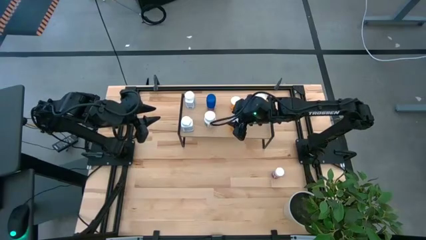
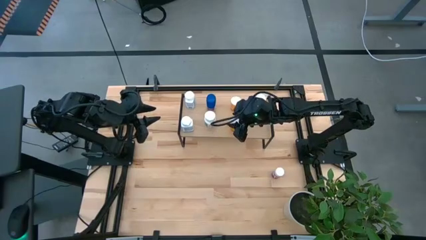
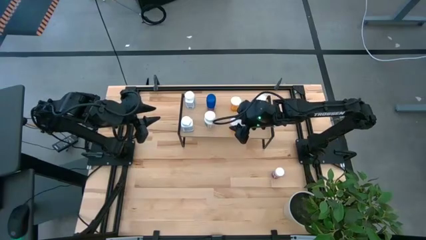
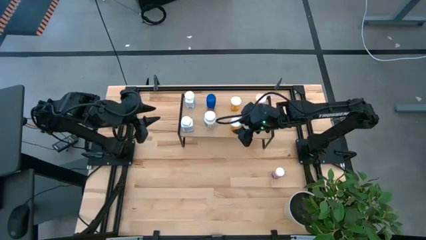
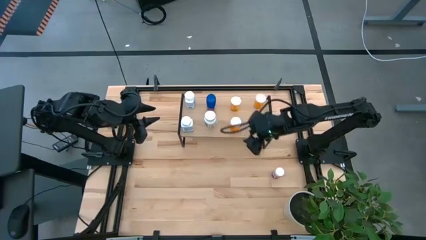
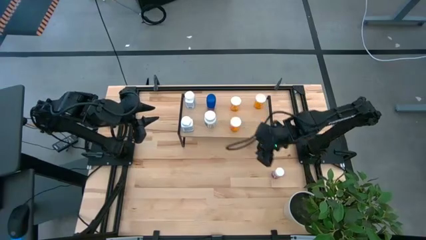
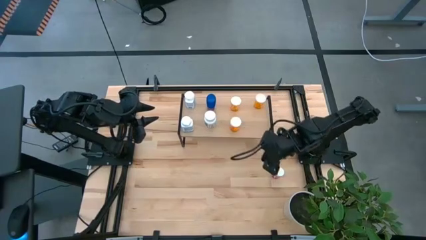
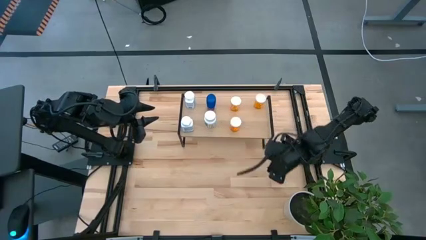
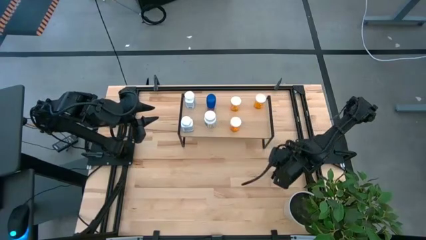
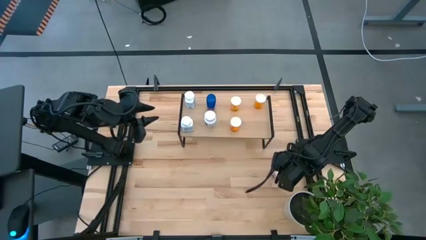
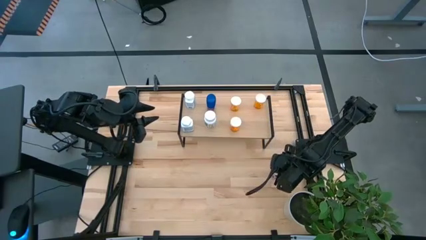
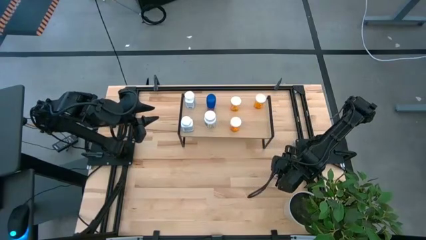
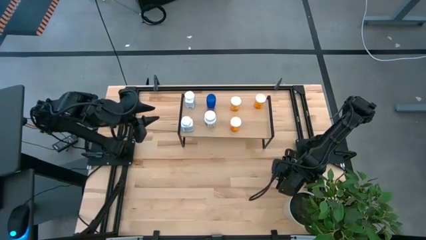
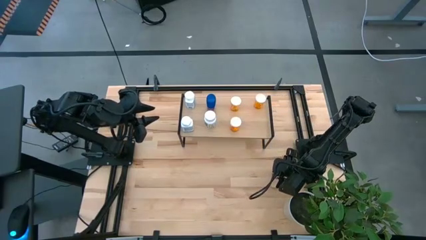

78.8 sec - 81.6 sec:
Task: Pick and place medicine bottles onto shelf by color
Put the pink pill bottle on the shelf

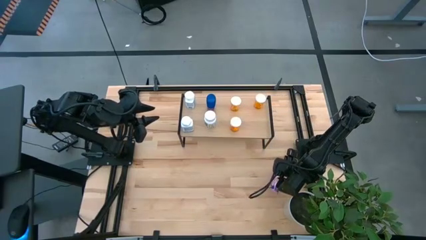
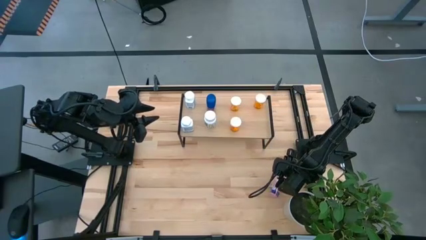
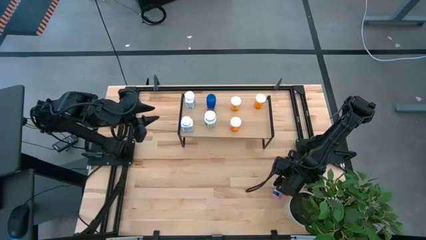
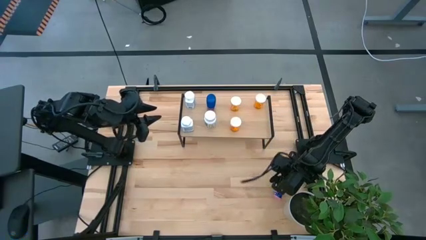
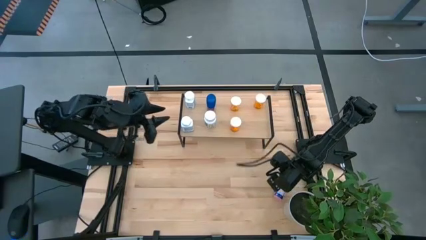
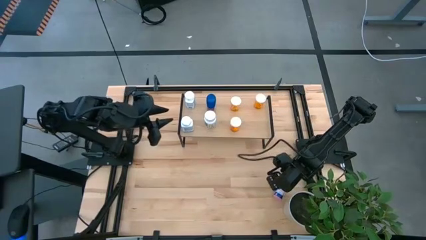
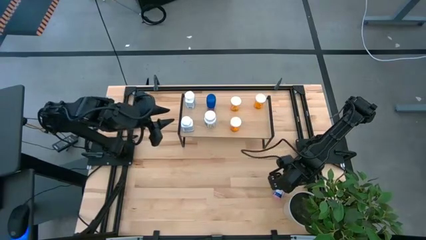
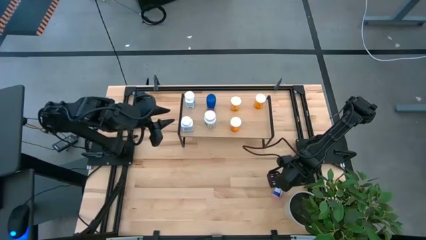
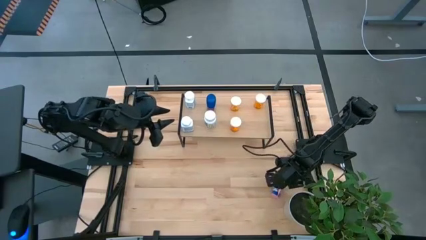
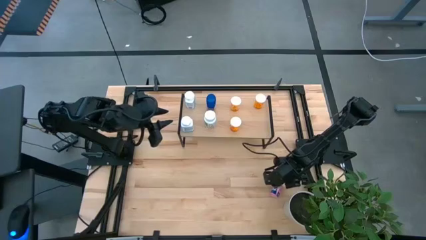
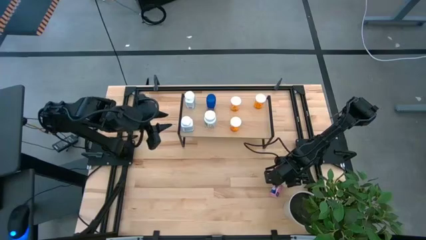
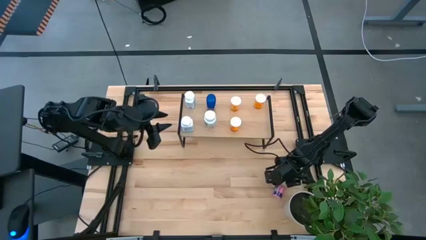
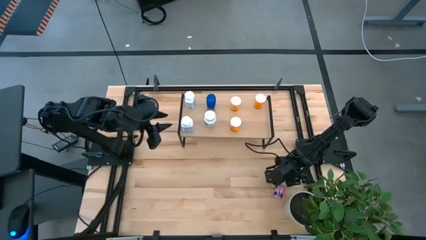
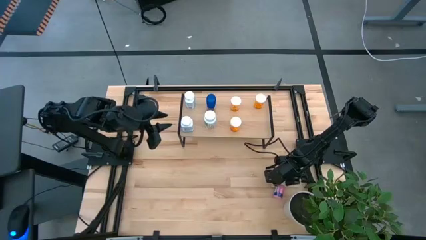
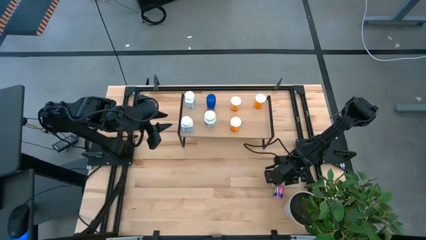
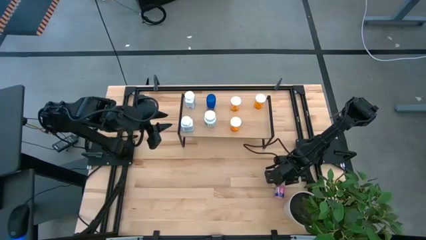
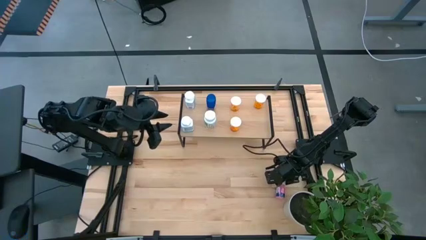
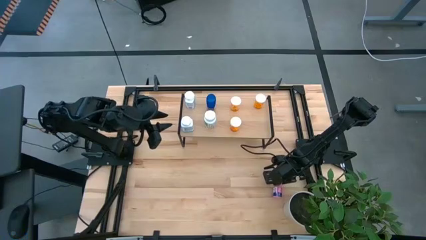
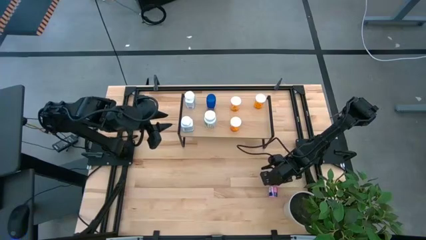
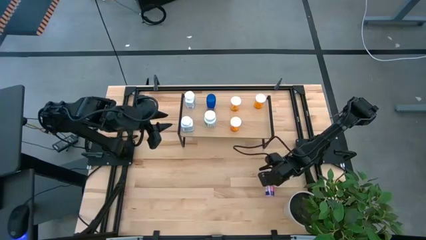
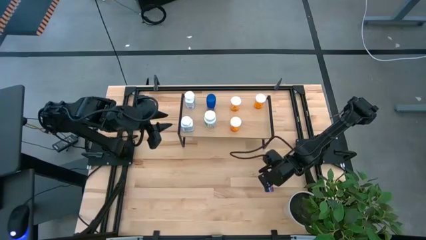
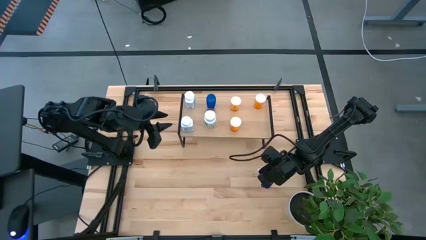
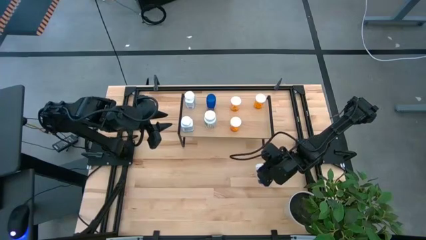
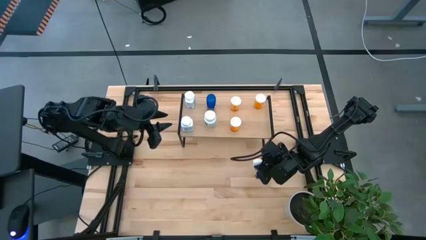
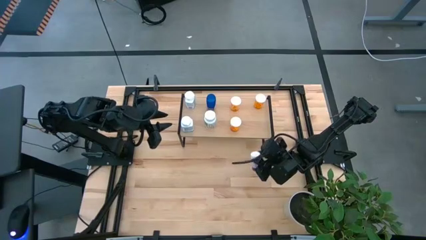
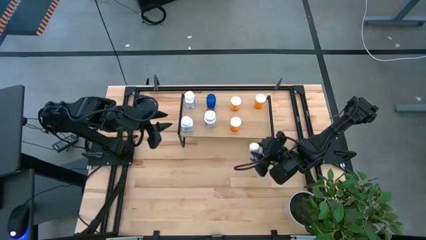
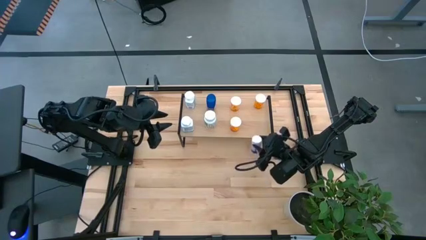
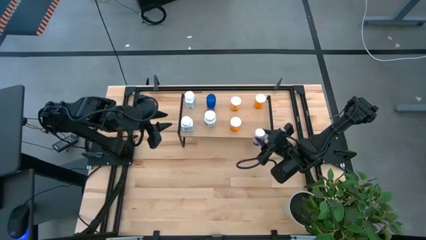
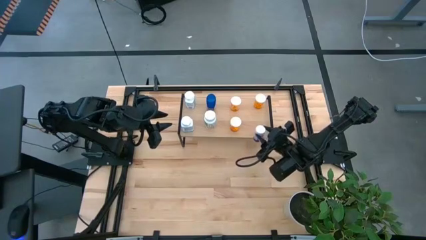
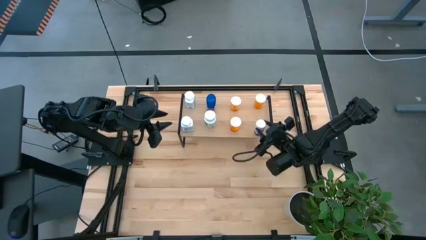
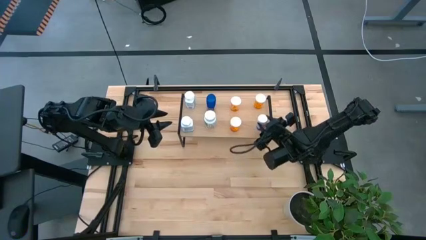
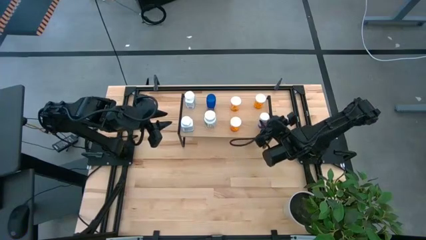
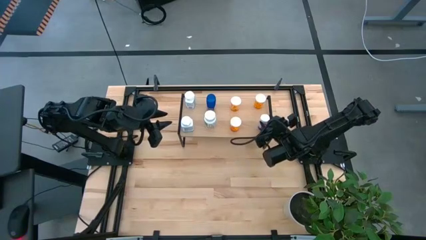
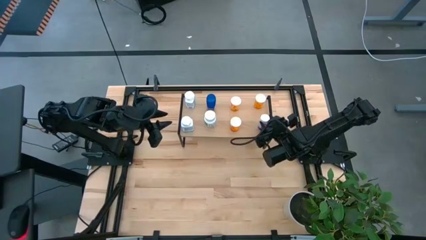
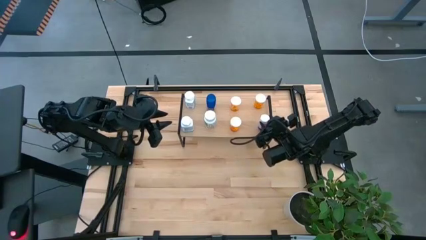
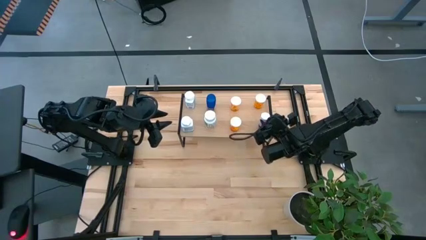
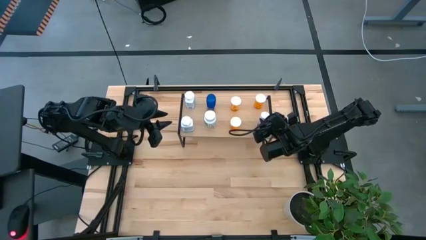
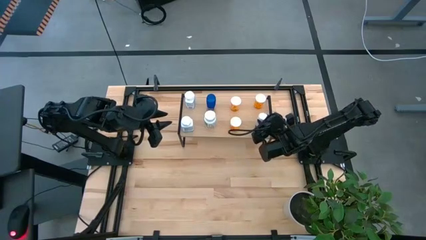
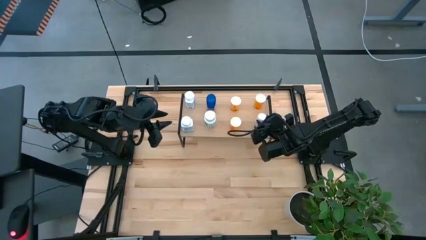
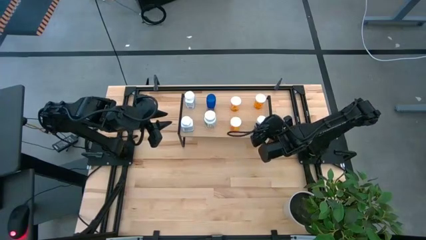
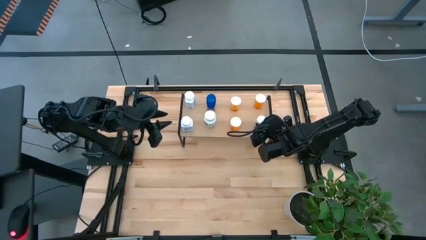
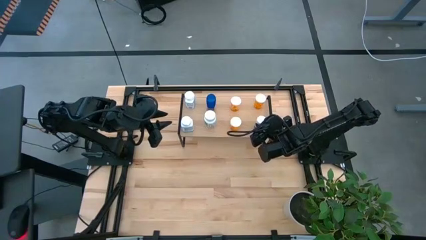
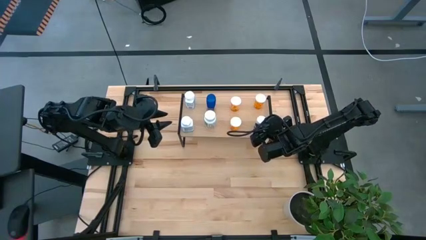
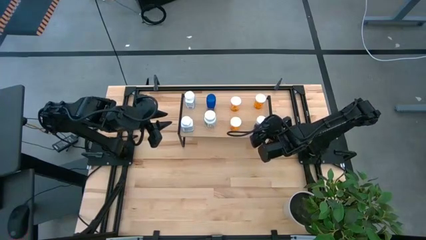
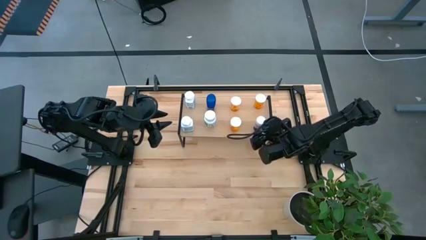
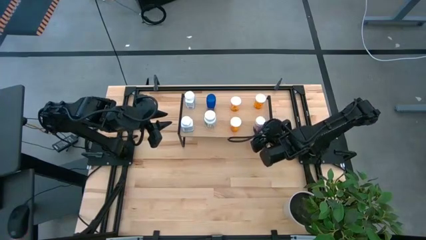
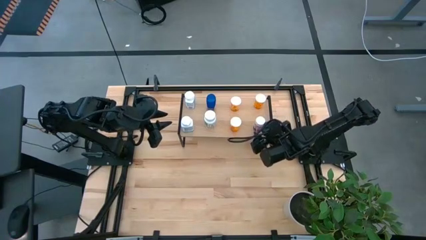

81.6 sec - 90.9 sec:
Put the pink pill bottle on the shelf

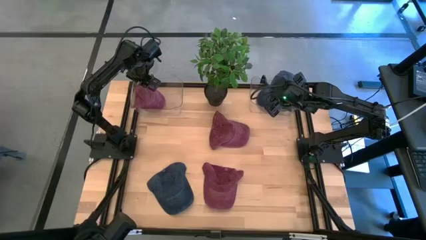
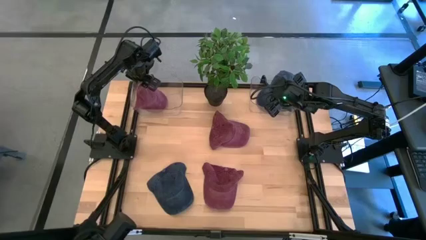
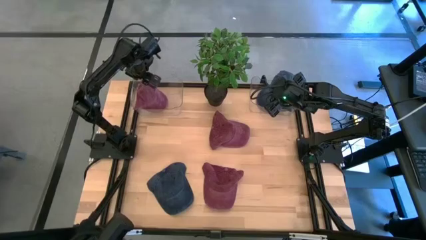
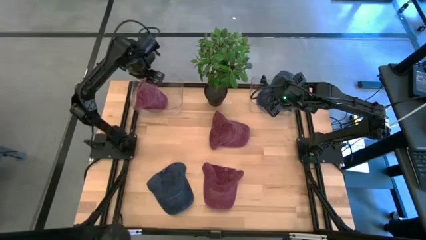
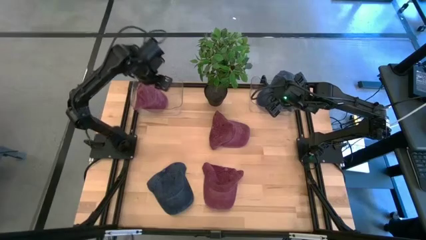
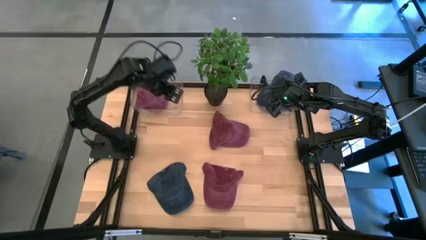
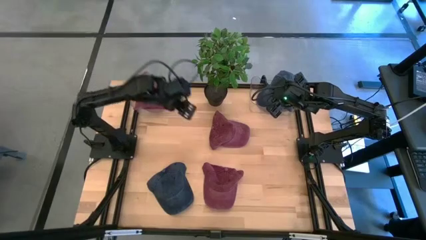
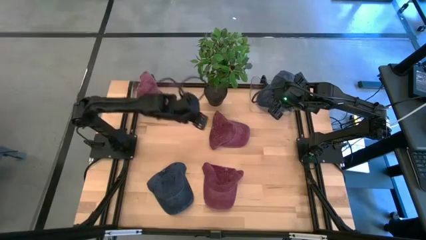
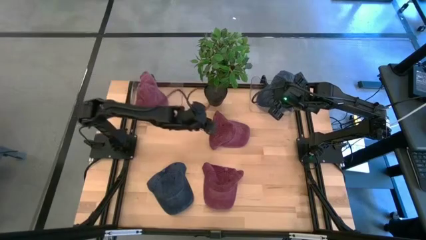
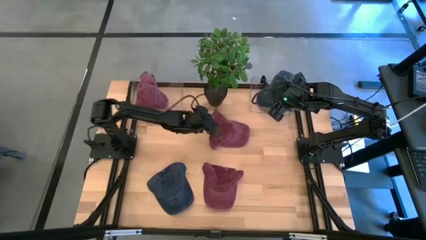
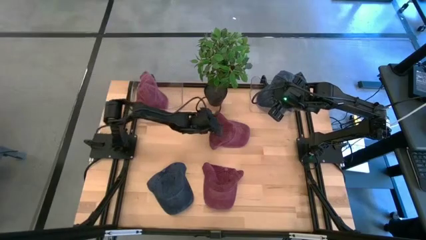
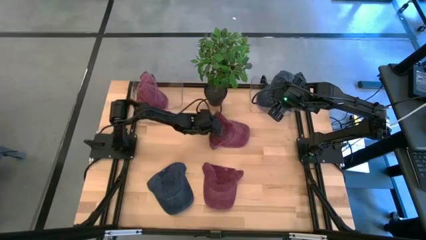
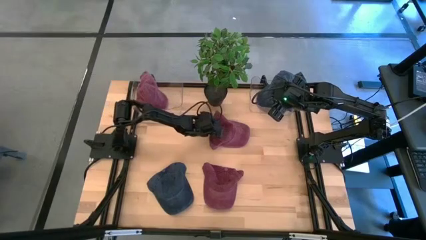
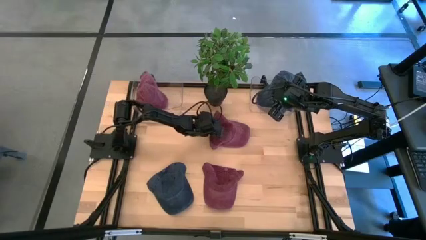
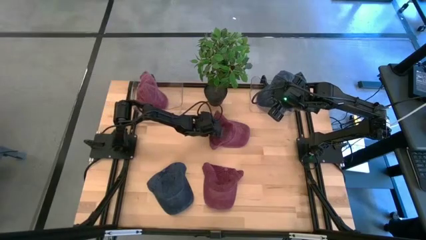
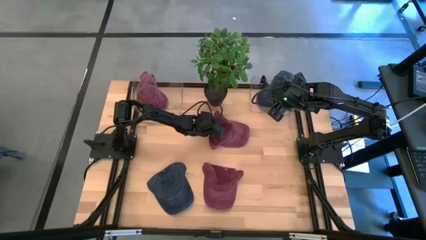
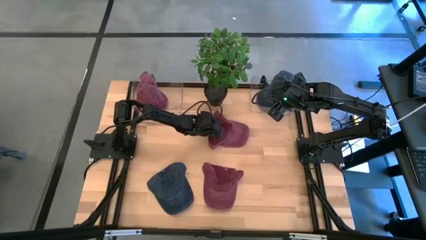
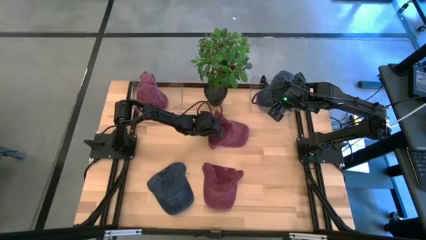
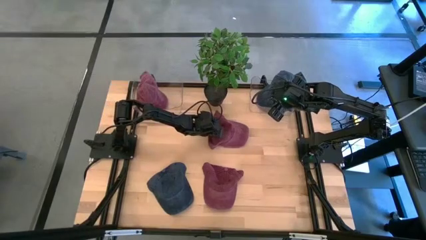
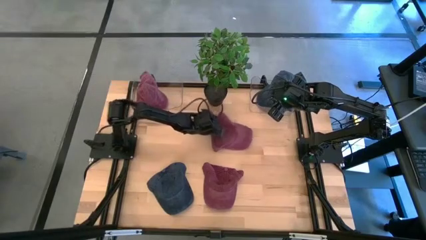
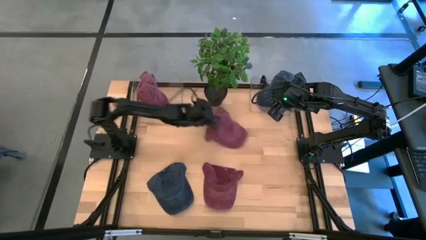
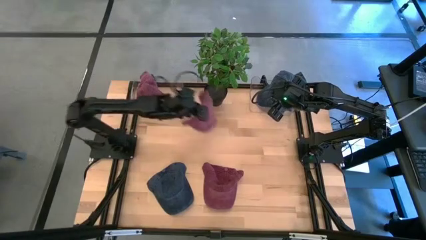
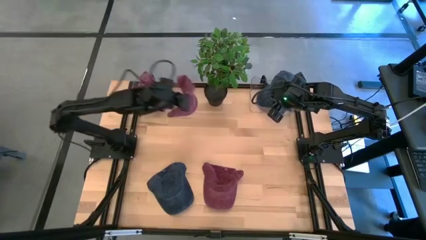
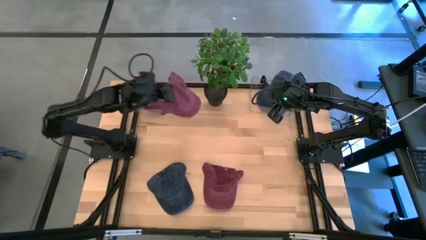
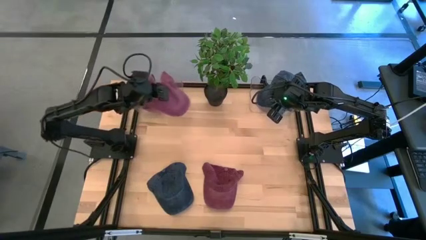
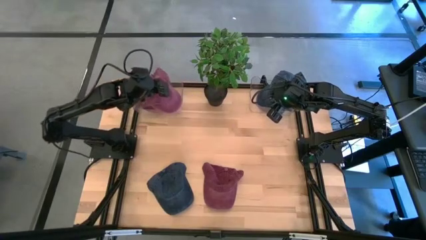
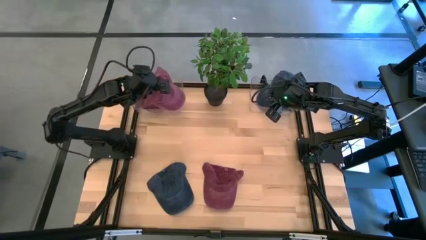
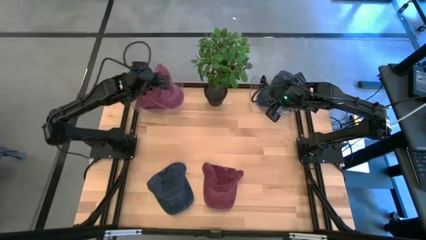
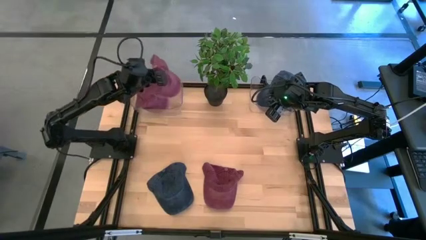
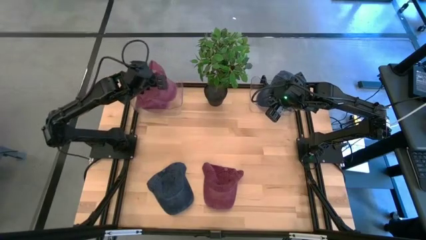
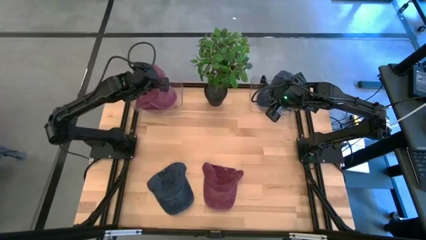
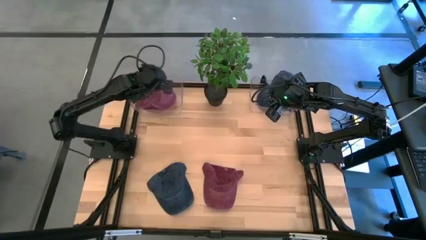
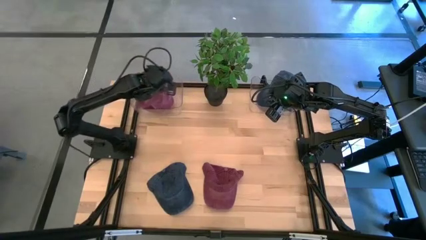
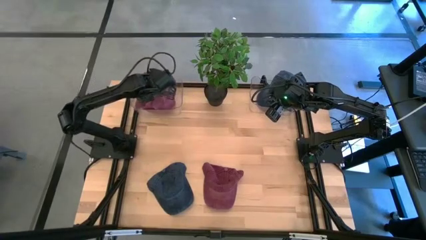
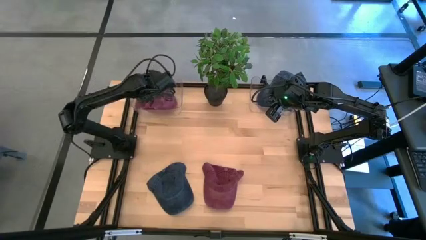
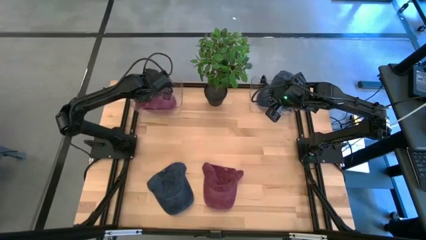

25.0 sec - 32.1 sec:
Task: Pick & Place hat
Put the top red cap into the left transparent bin
